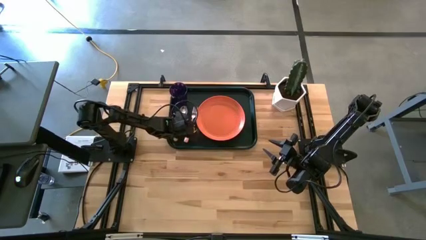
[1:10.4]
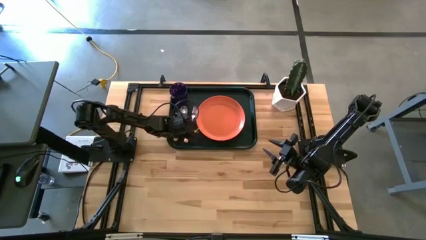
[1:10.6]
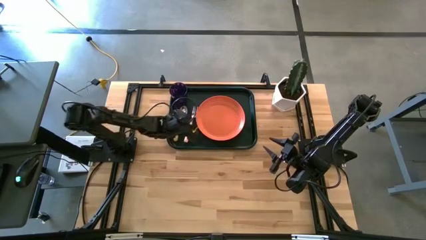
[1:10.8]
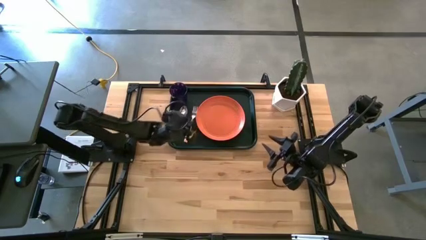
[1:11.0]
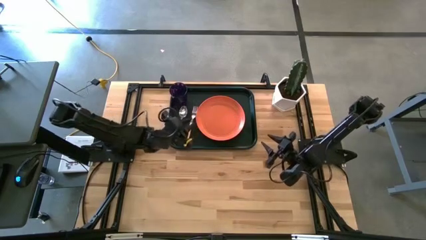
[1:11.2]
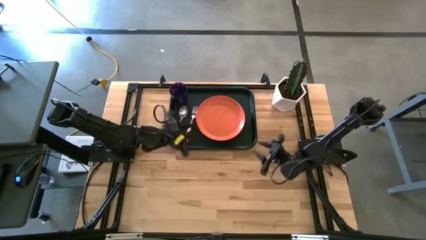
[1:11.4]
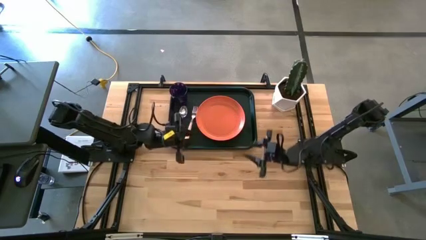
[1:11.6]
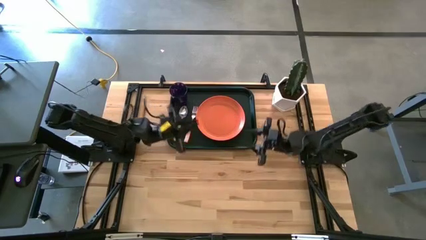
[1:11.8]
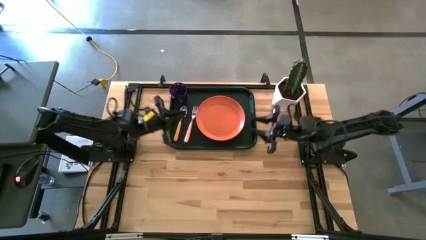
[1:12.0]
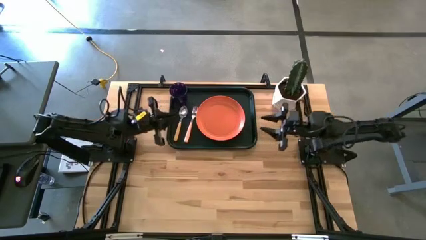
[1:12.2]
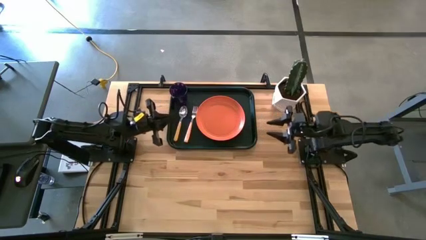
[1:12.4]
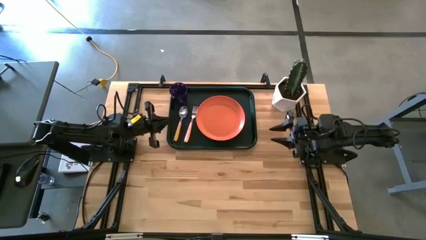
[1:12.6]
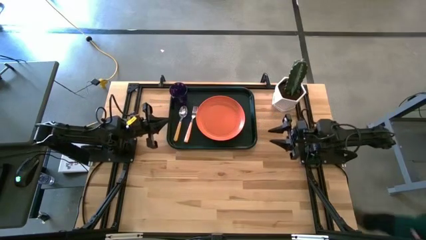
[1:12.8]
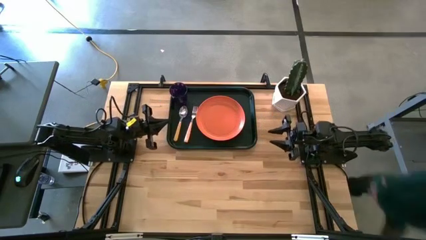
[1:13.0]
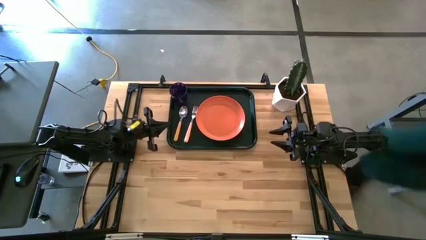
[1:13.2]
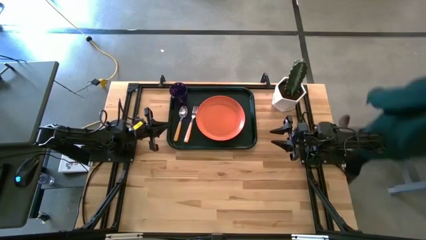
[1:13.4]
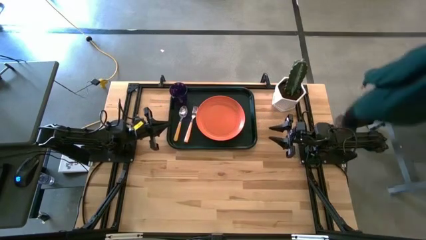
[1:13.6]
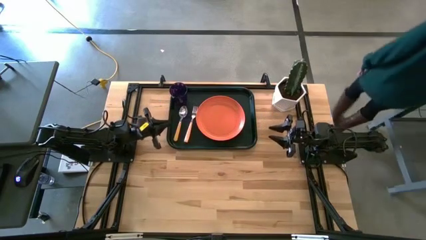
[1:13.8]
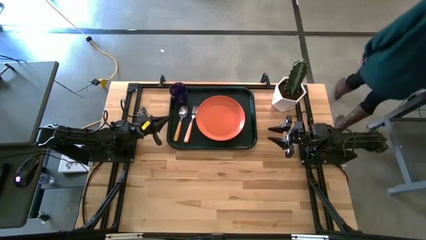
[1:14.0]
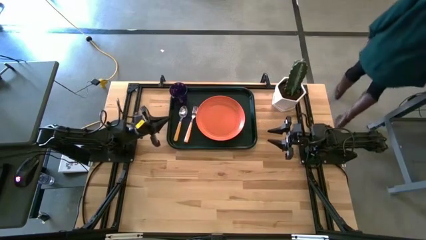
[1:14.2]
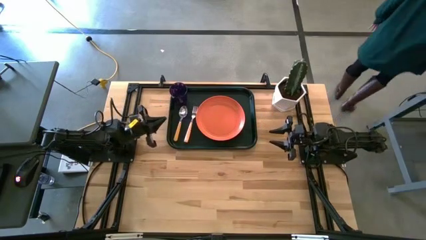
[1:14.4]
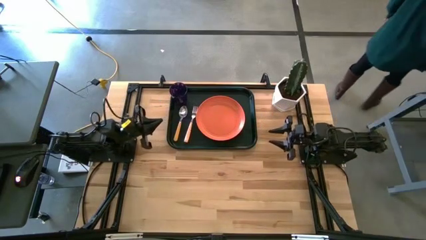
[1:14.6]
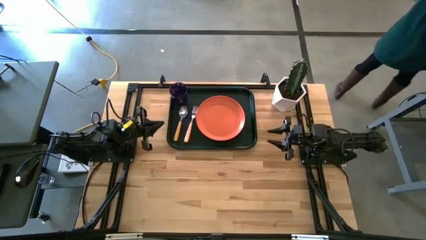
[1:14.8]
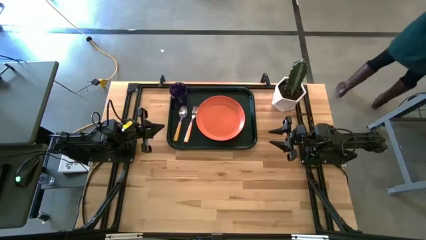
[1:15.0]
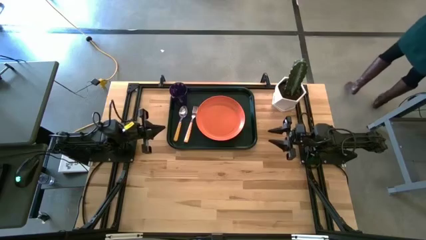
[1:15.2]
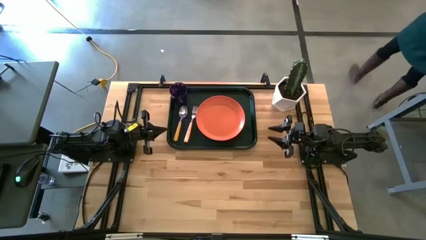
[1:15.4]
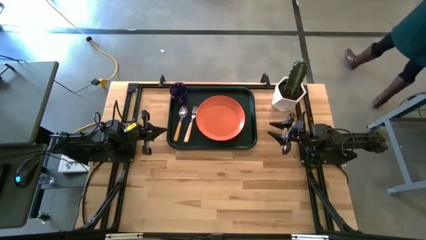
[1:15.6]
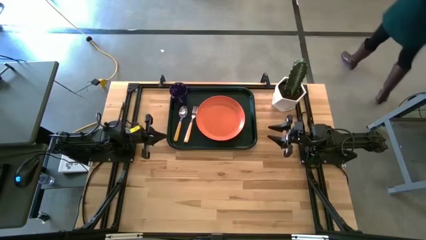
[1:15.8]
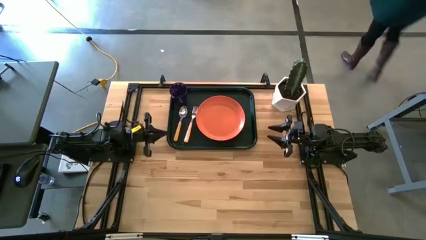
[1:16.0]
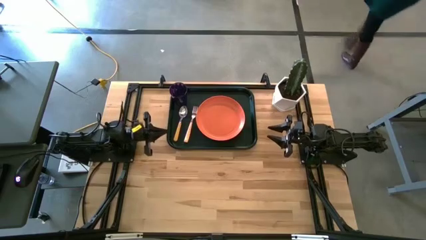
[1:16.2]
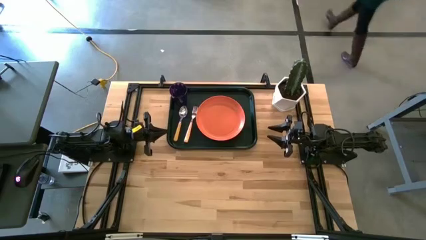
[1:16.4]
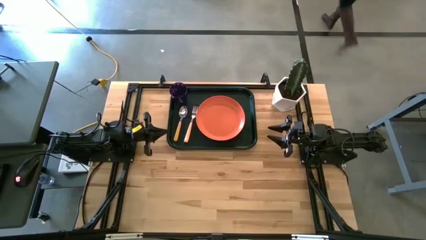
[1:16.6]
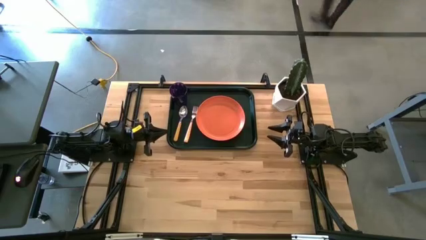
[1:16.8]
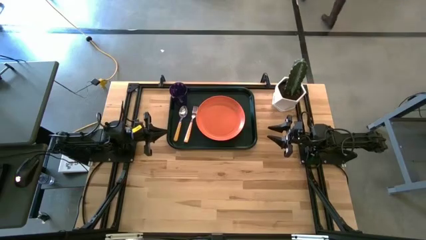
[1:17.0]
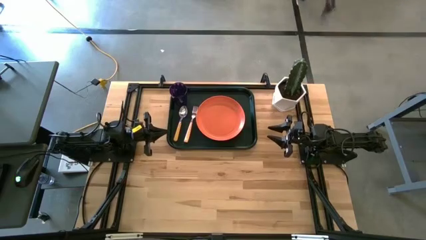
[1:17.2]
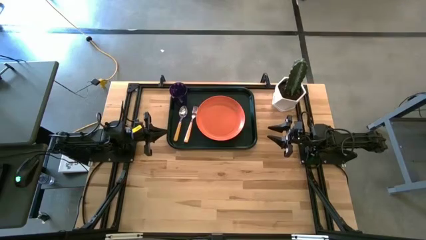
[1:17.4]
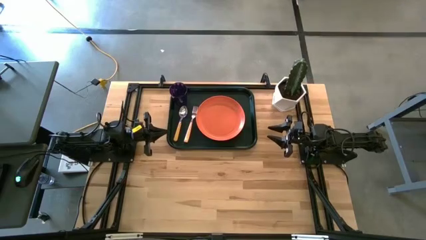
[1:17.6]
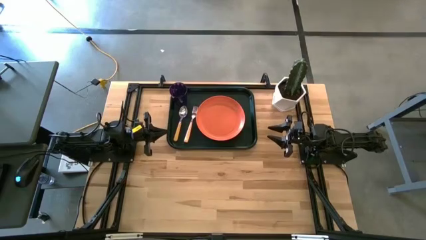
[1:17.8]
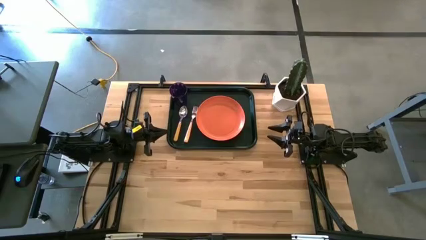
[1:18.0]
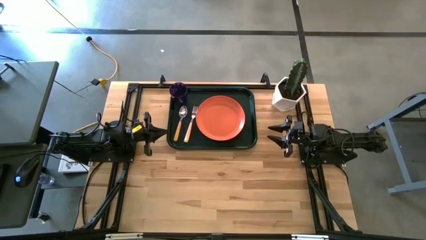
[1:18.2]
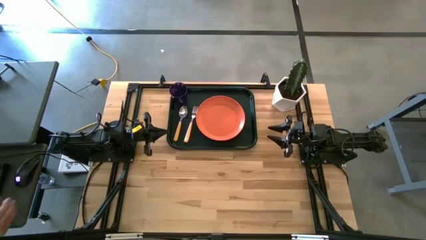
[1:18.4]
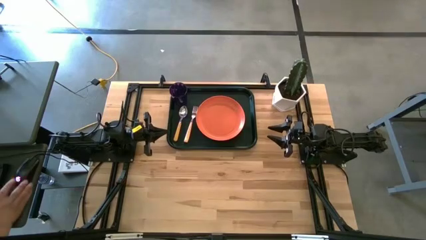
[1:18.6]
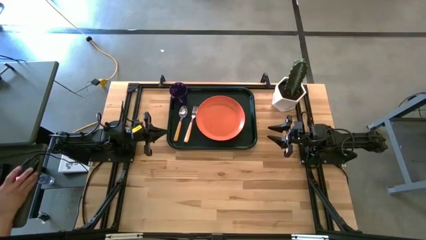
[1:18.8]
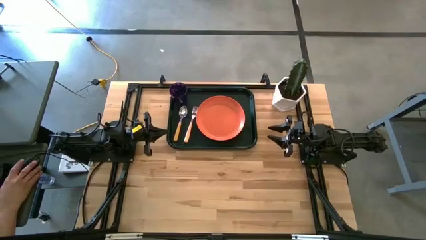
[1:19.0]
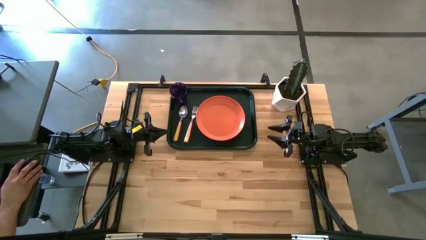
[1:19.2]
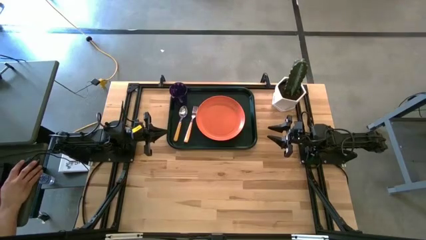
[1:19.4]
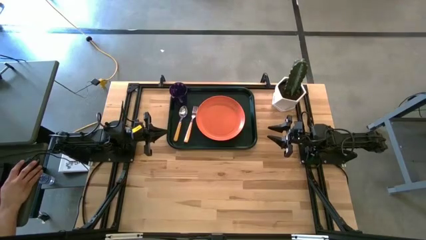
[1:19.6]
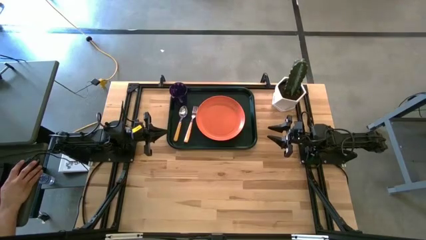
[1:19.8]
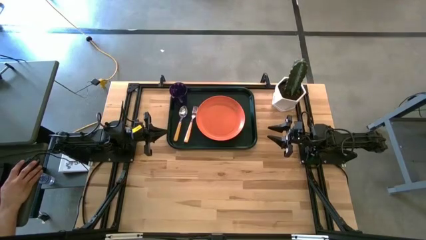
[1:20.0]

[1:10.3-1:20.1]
Task: Pick and place plate/cup/fork/spoon on tray
Return to Home Position

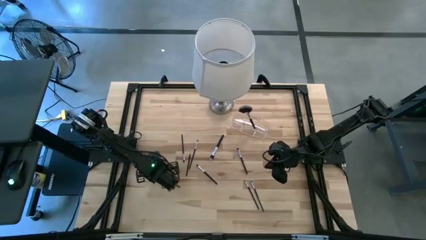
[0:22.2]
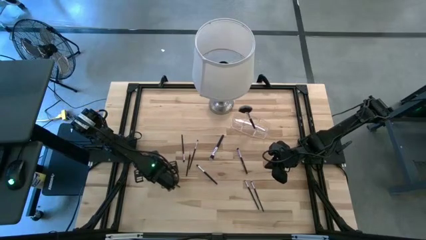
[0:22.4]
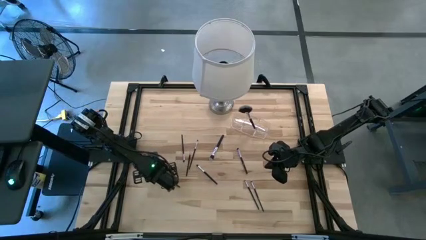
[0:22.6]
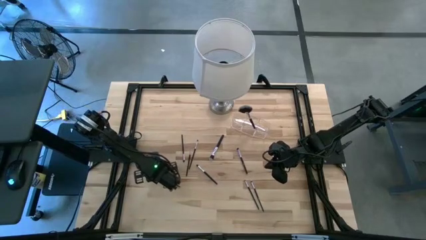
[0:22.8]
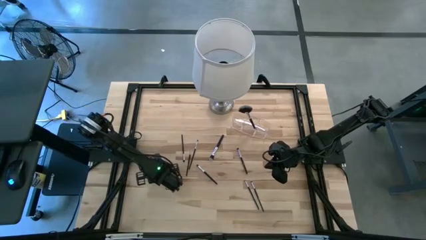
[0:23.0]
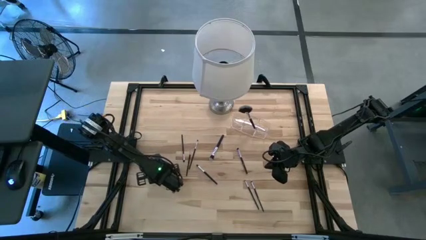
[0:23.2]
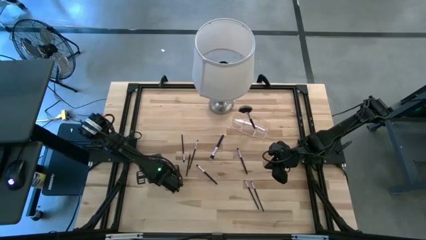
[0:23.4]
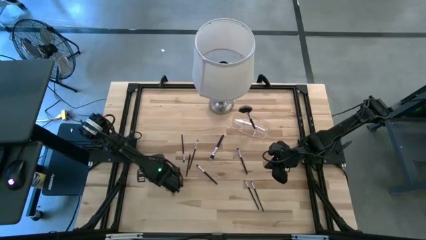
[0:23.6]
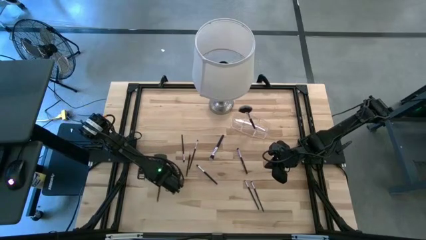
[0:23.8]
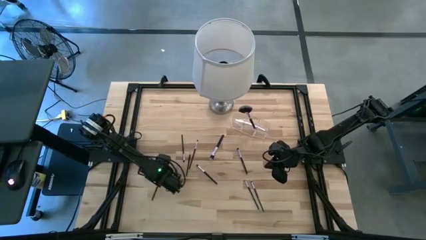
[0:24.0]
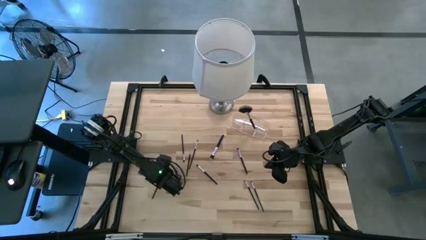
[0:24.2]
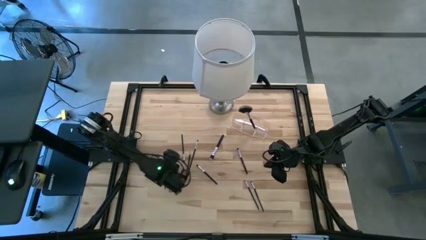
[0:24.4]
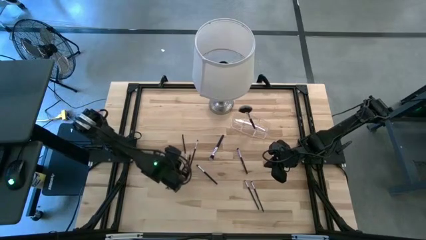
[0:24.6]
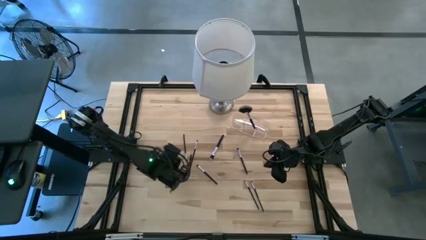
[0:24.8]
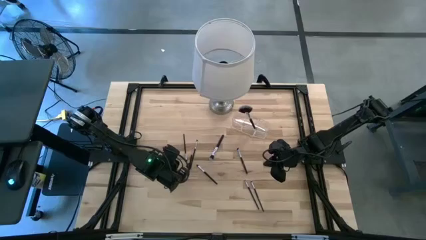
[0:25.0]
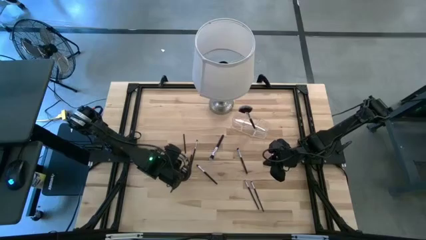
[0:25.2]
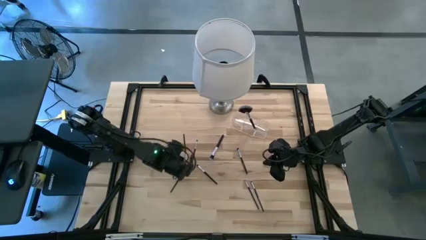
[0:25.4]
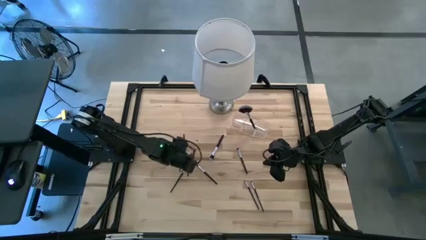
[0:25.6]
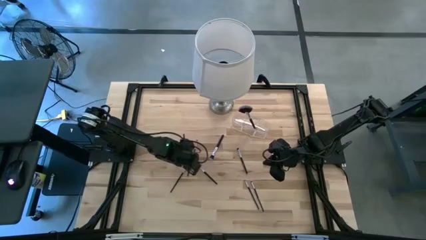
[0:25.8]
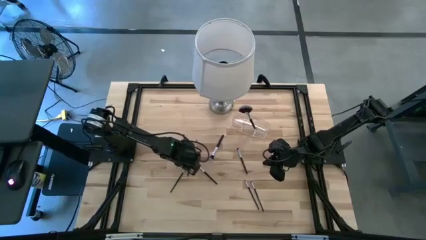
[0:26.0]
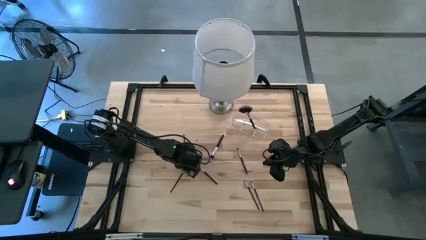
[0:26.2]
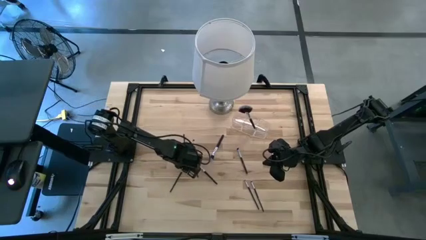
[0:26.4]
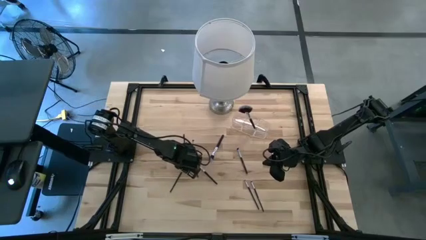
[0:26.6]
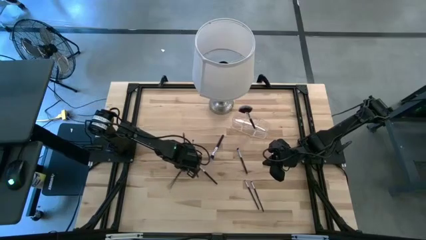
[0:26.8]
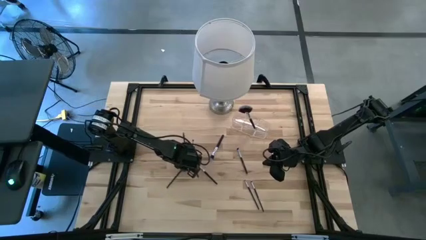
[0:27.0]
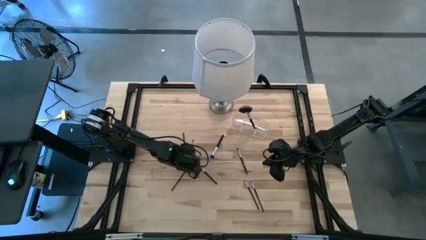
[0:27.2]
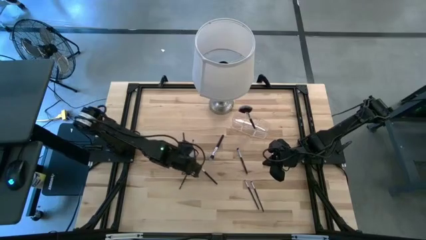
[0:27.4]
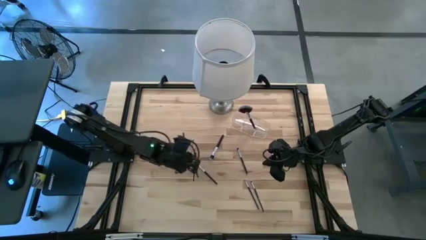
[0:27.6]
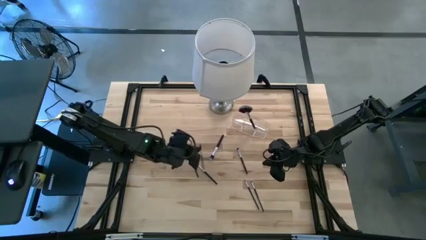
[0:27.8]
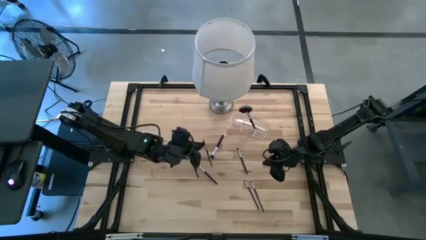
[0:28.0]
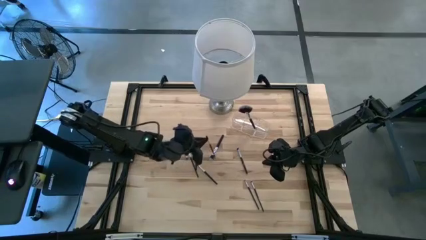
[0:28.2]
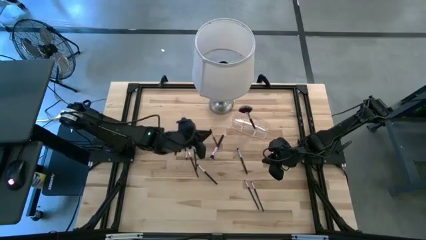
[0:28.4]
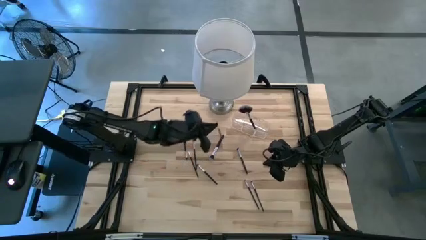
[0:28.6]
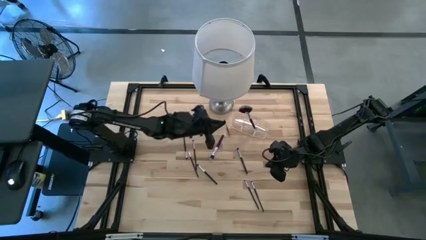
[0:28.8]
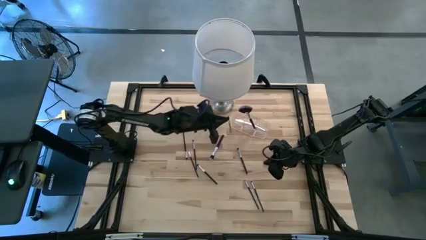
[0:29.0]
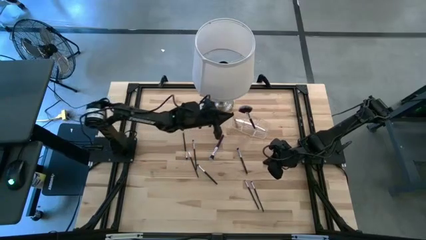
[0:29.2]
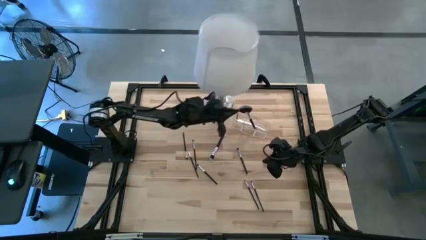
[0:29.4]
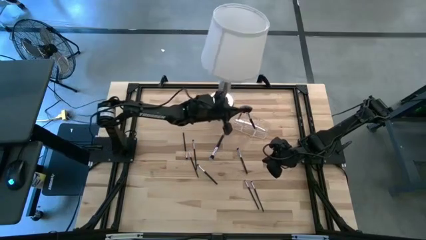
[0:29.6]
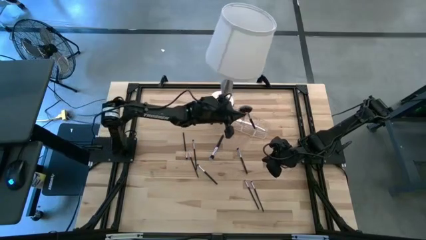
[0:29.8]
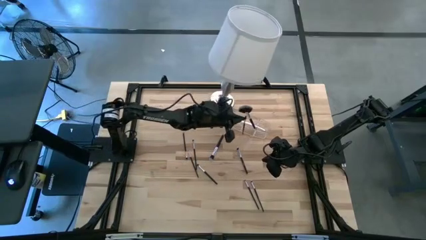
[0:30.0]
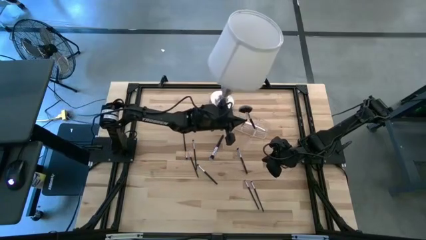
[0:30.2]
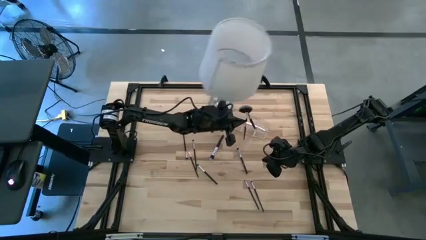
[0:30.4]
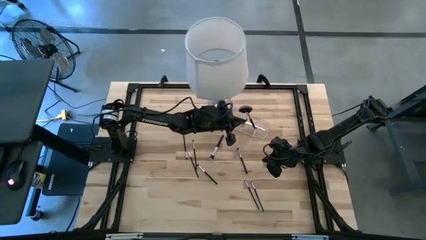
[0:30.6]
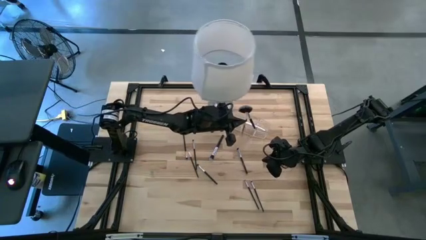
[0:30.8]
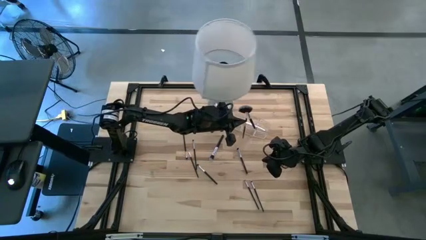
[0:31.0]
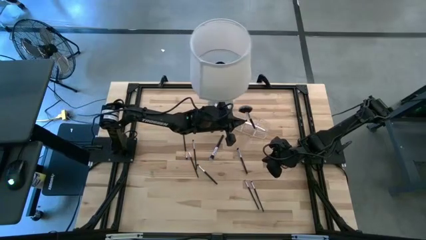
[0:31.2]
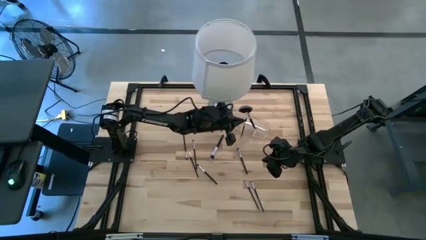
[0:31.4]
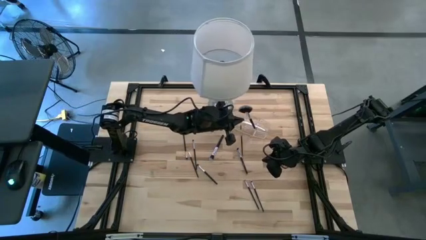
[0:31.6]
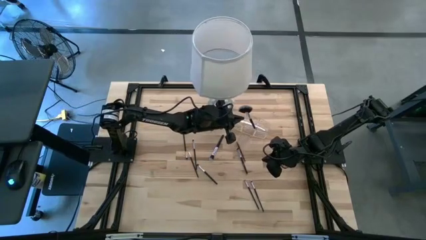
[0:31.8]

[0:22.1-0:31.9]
Task: Put items in baskets/containers
Put the black lash brush into the transparent organizer
